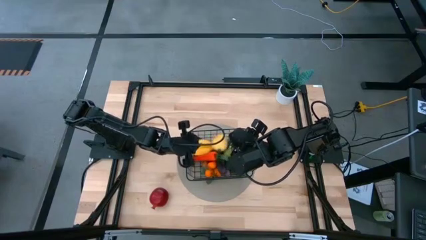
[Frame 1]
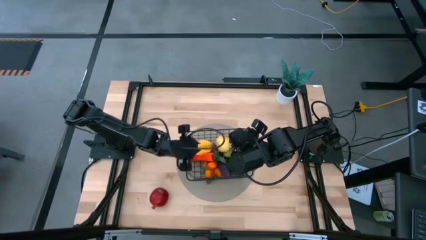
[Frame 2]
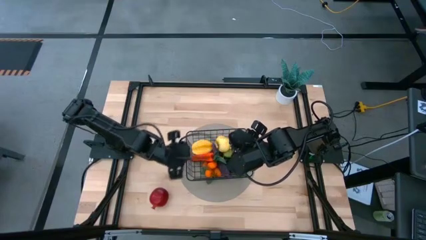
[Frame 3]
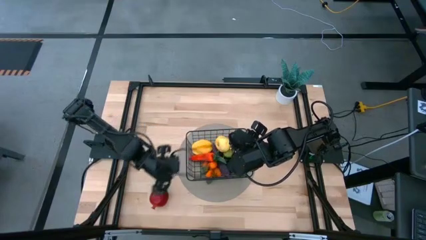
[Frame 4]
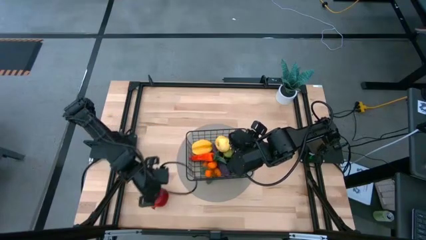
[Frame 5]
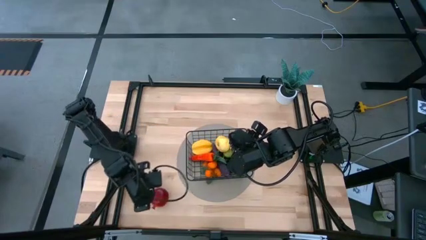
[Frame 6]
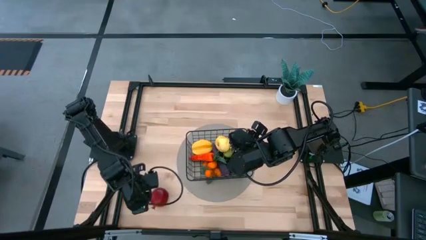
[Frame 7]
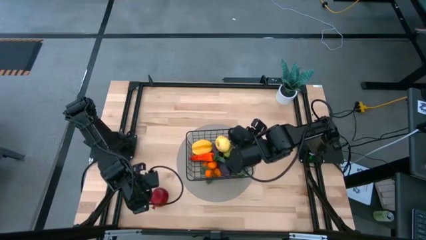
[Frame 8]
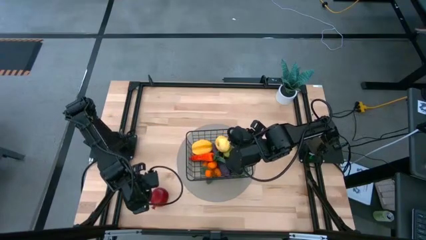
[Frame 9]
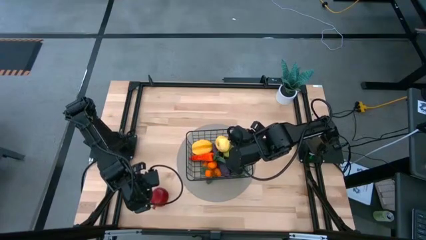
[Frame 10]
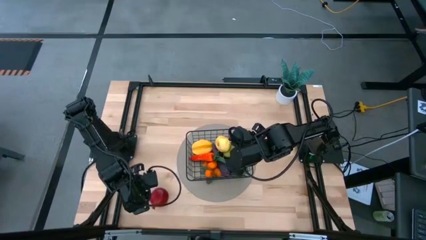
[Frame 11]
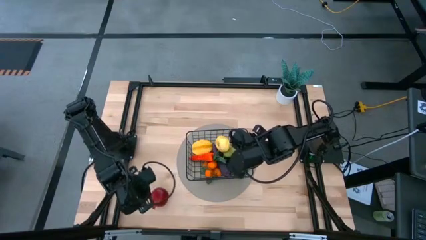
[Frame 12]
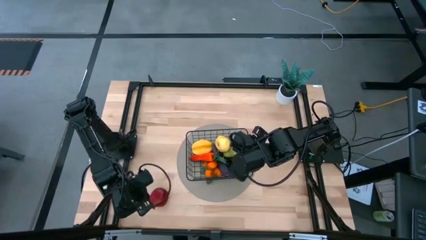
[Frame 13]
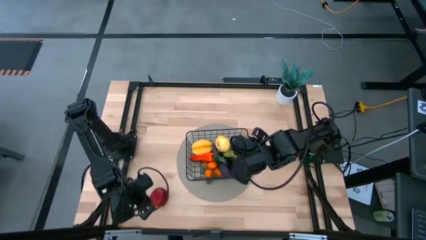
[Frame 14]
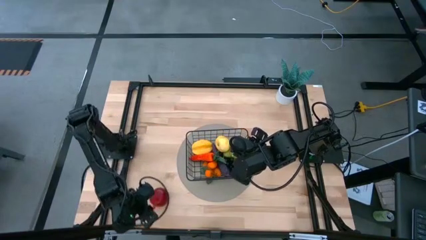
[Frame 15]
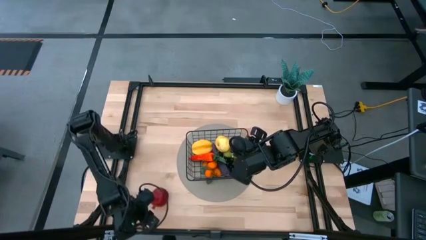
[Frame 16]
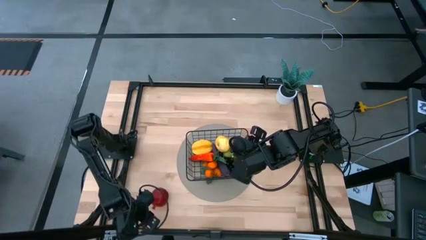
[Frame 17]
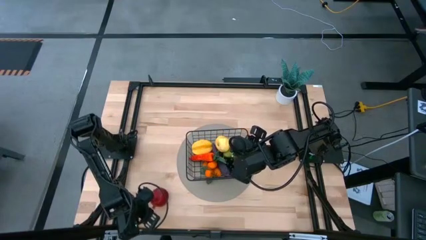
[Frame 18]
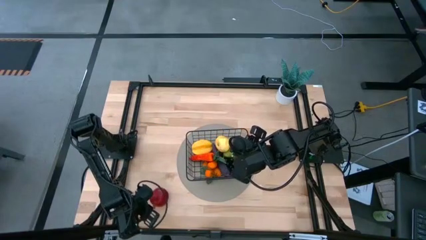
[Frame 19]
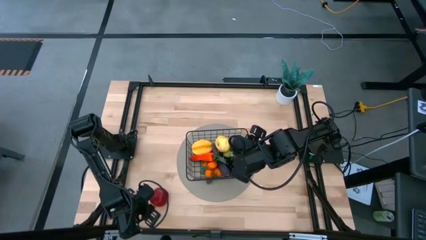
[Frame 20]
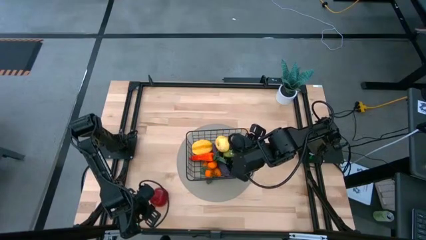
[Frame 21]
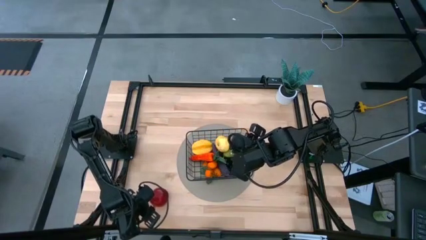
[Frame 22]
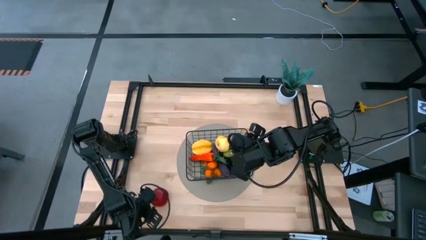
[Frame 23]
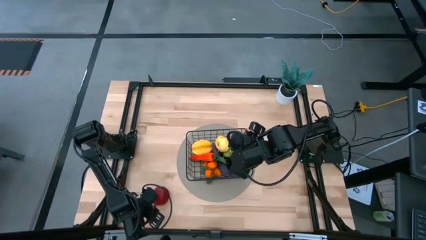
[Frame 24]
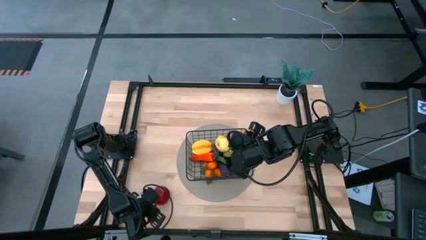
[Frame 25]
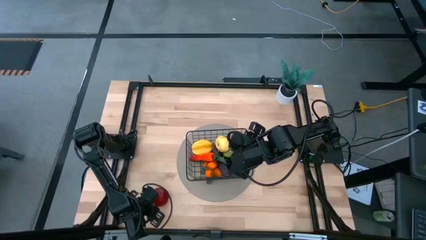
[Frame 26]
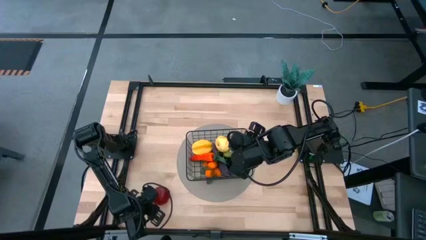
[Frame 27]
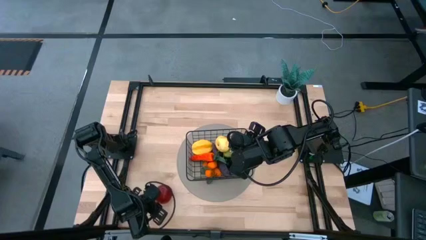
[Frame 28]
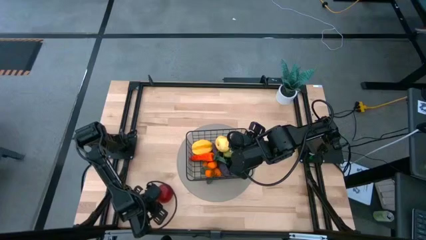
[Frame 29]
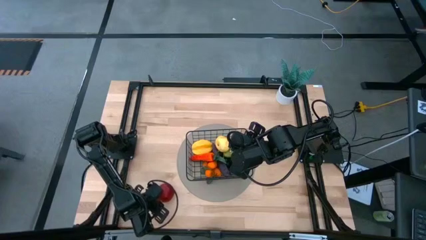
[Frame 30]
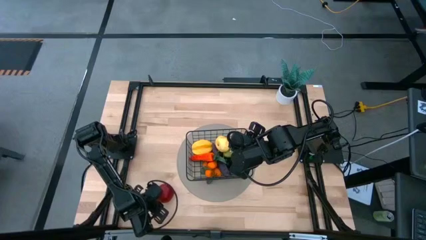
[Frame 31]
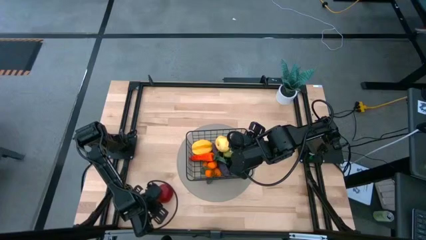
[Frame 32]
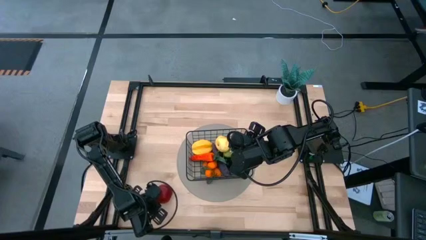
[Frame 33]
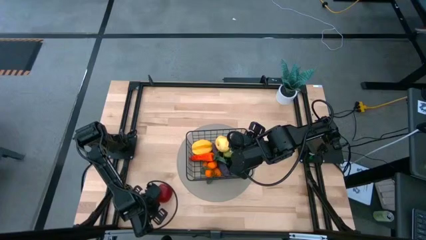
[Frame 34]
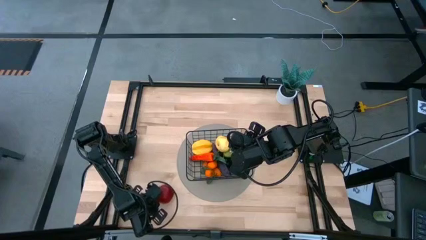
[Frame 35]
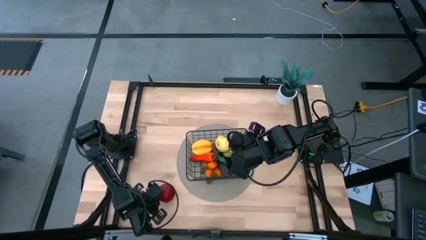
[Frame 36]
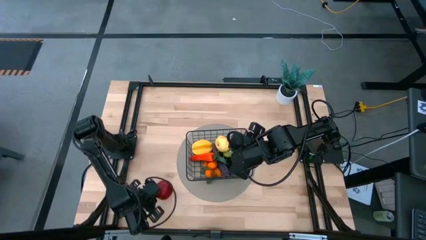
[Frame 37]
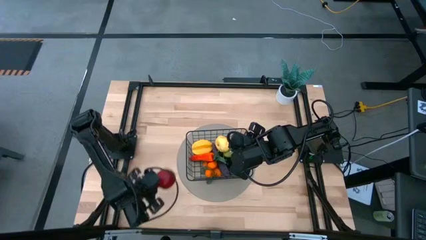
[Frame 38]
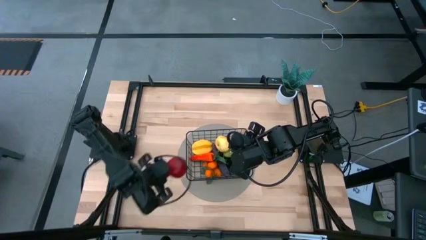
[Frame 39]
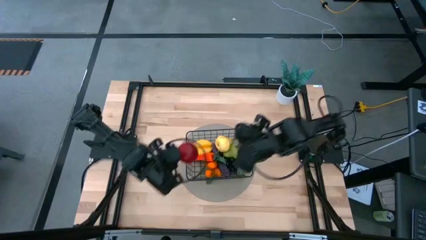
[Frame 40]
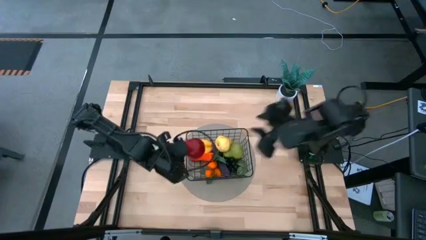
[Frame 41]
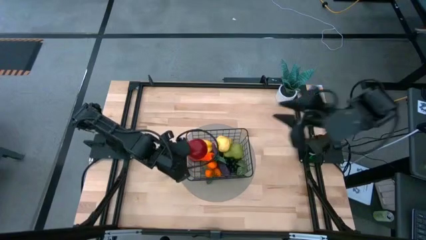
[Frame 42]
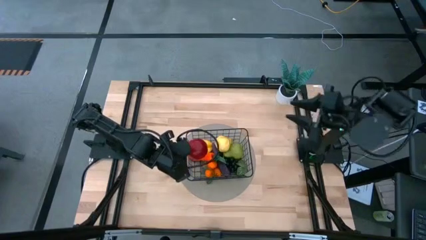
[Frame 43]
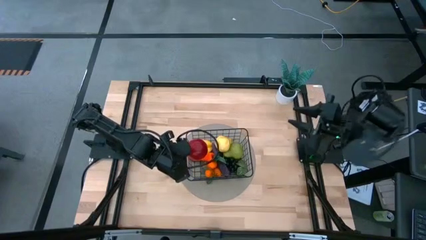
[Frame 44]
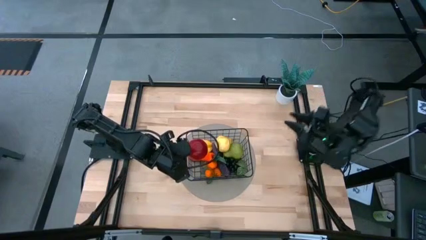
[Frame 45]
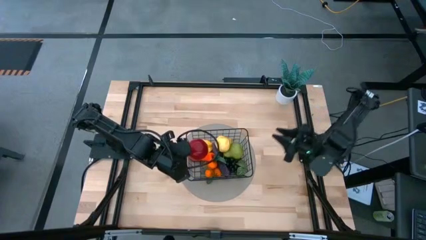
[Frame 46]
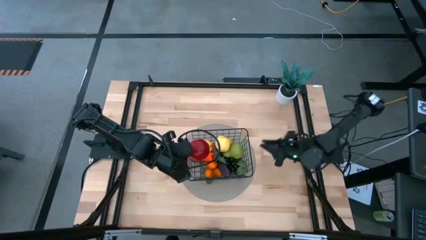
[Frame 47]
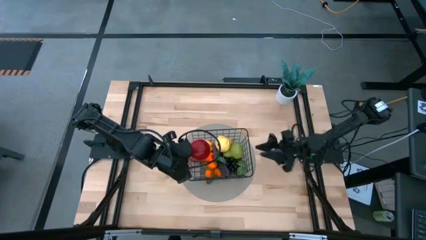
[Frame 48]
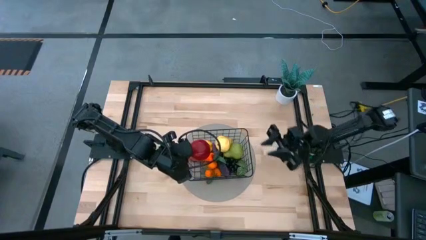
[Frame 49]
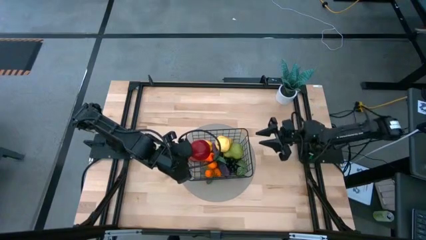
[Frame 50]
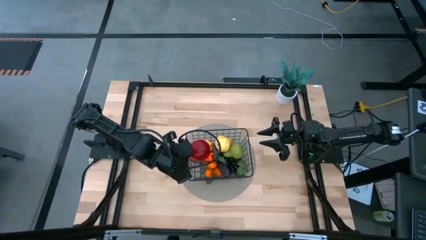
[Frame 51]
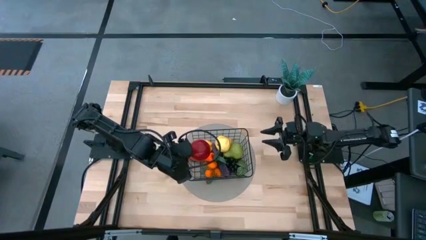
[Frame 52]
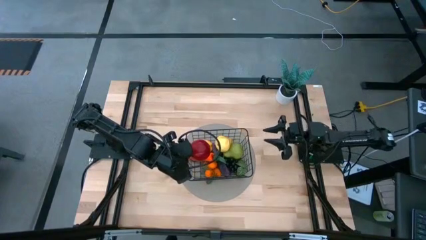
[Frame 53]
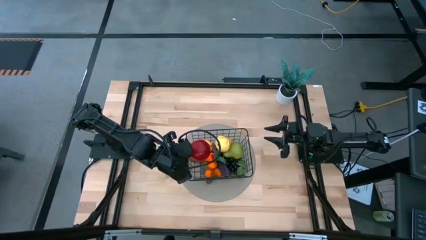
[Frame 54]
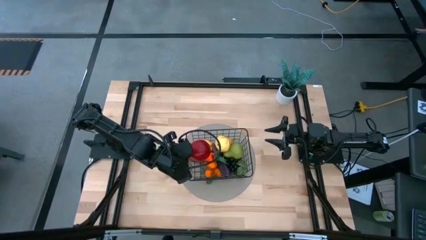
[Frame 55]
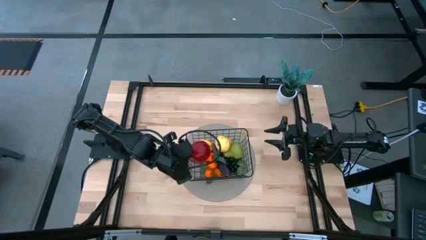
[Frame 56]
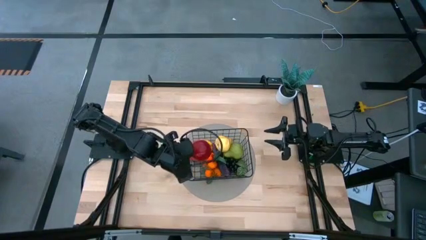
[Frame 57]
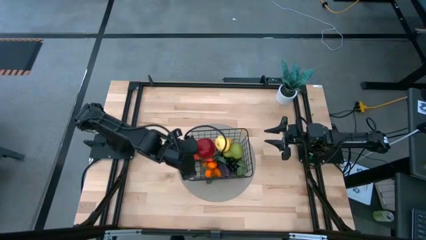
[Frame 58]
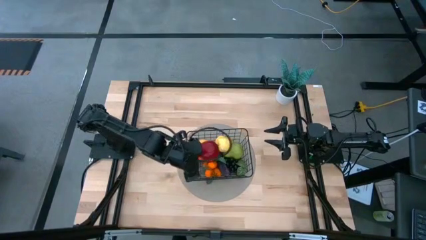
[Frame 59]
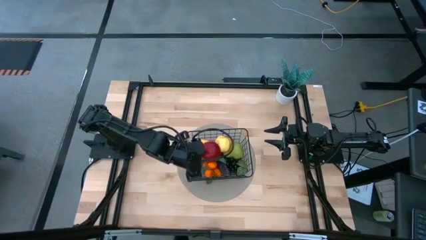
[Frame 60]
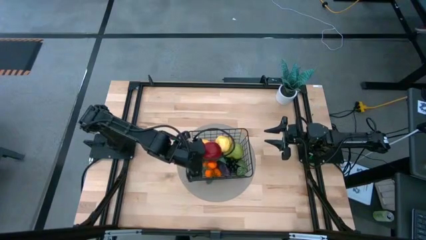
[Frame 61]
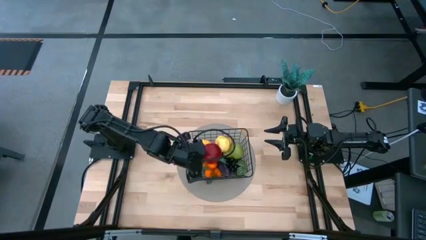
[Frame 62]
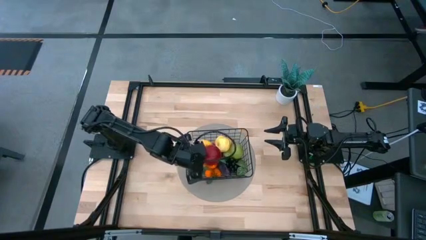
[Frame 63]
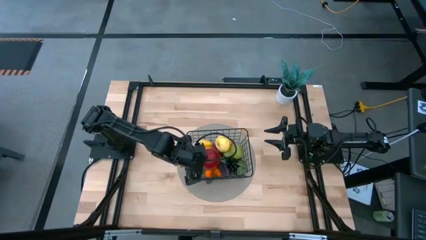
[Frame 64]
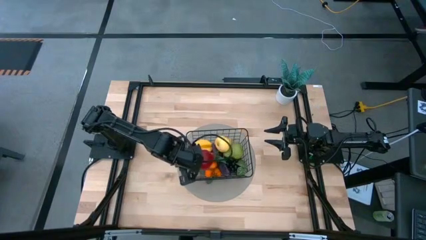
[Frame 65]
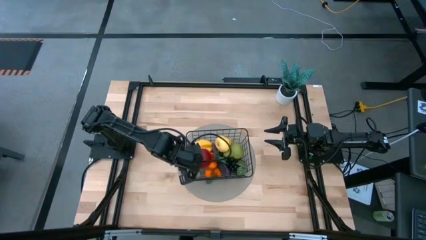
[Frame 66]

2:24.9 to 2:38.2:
Task: Build produce basket
Put the pomegranate in the mesh basket

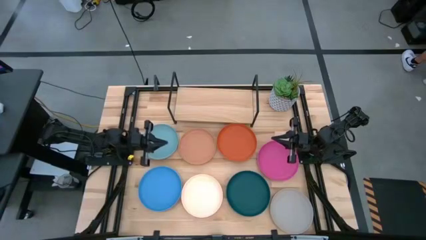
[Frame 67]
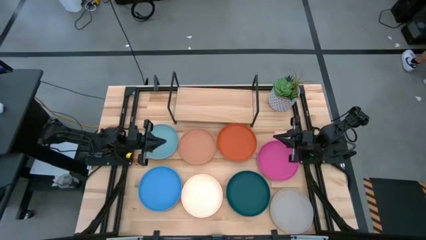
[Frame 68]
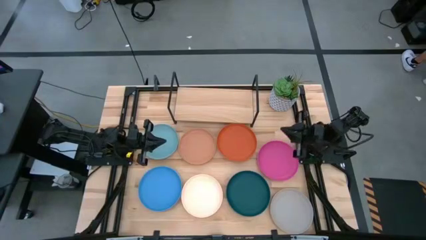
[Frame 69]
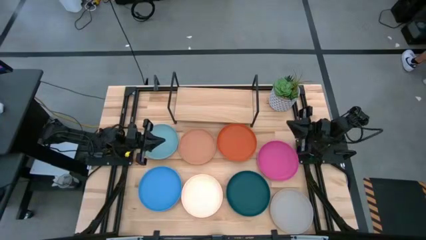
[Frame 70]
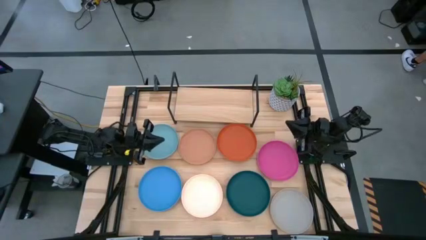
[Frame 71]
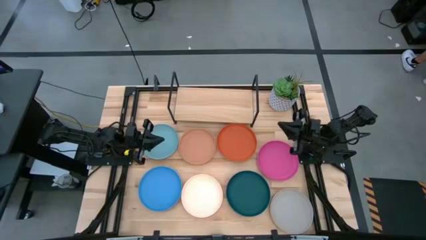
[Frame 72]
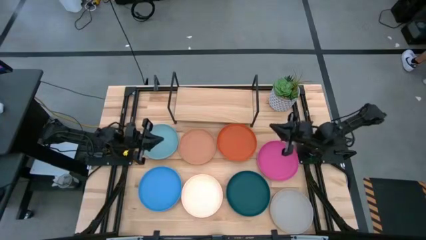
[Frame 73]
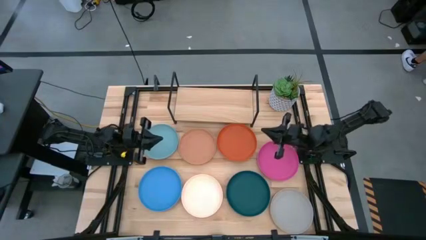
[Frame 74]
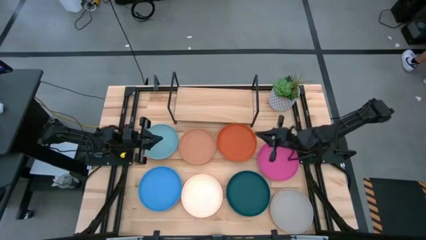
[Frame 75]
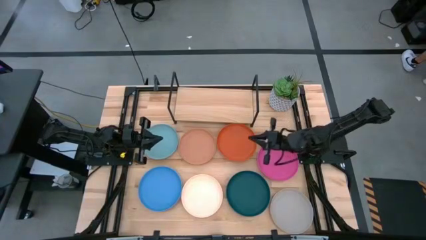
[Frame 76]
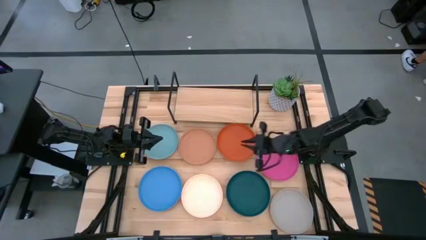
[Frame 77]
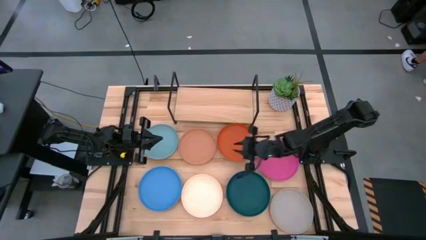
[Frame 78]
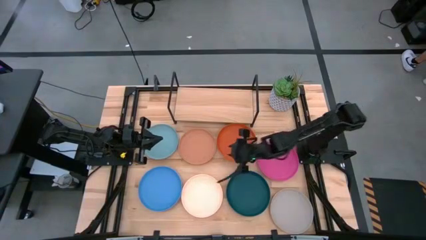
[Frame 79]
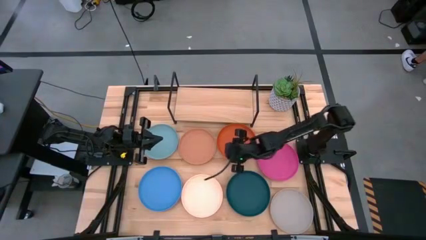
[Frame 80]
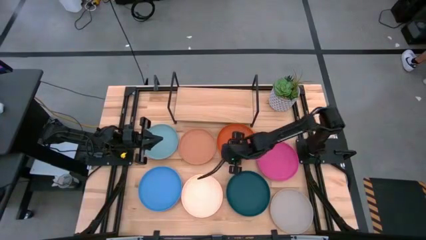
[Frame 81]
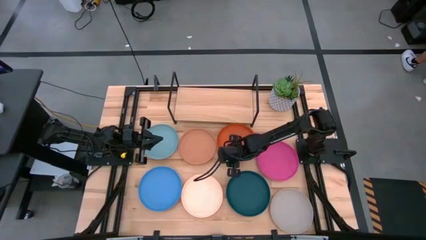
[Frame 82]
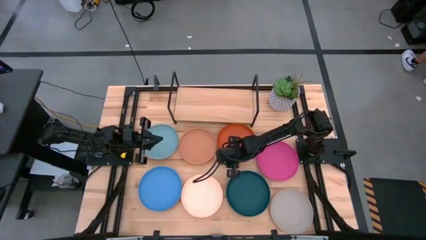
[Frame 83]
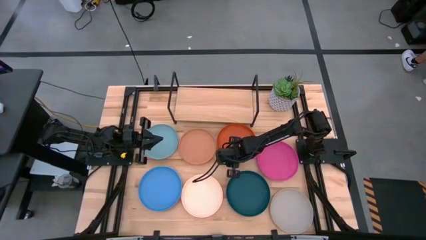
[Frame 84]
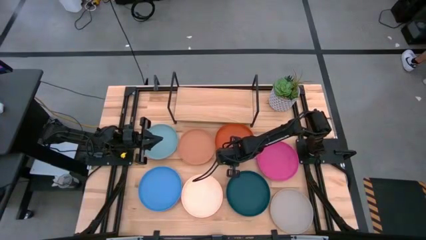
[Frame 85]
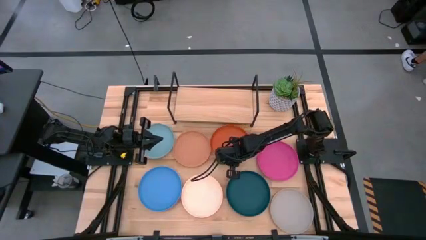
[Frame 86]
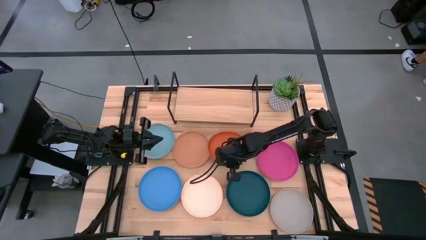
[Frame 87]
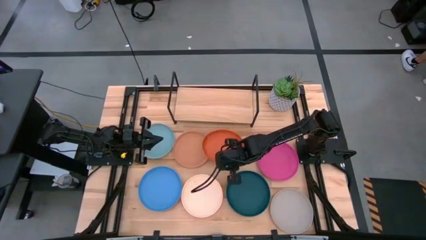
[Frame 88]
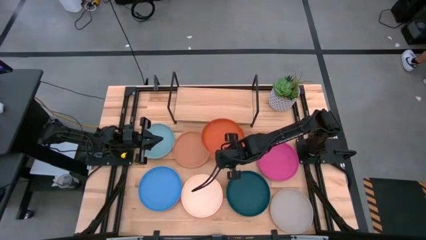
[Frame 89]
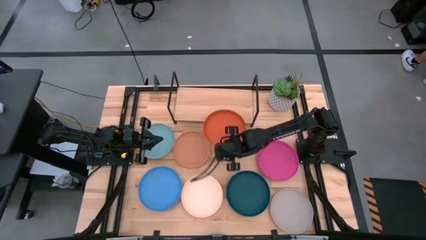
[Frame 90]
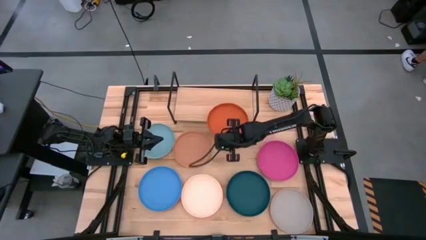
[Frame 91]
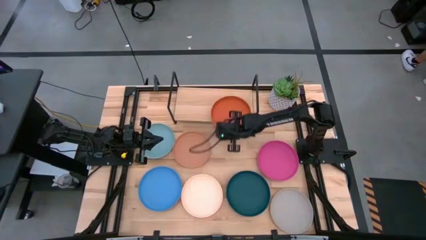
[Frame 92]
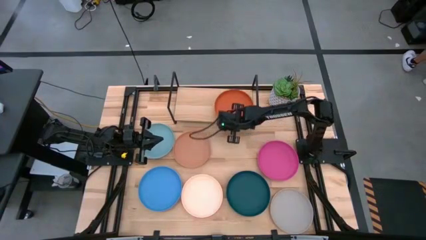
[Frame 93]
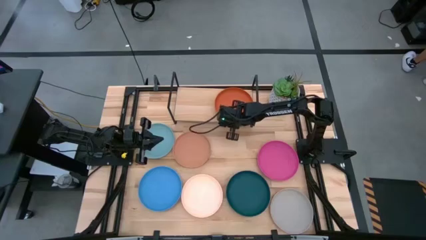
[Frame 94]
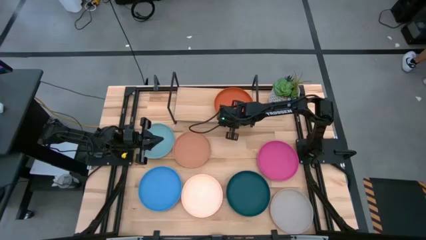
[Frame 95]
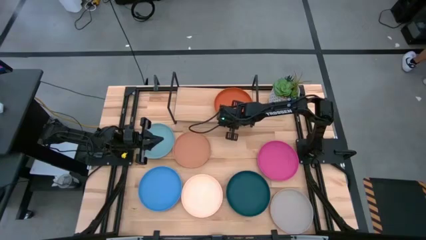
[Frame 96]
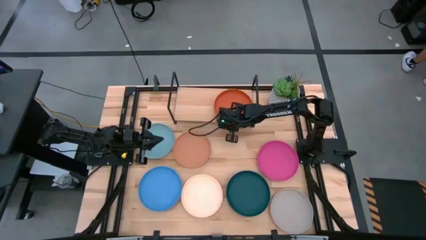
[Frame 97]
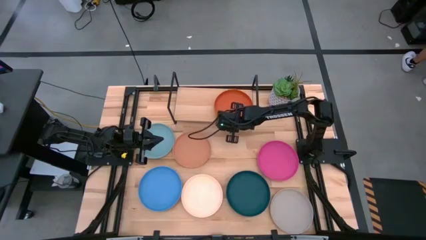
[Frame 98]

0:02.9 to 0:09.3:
Task: Place and stack plates onto a shelf
Put the orange plate on the shelf
